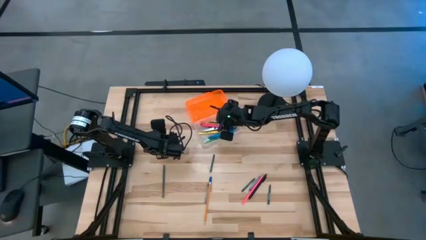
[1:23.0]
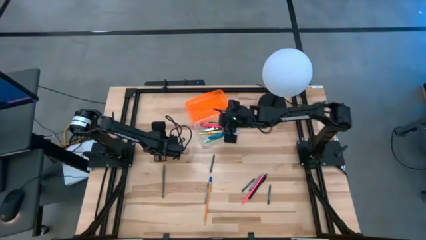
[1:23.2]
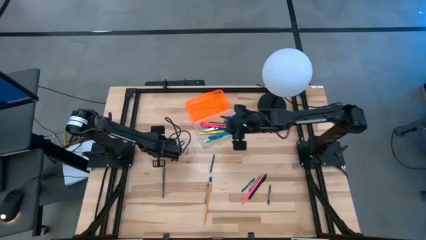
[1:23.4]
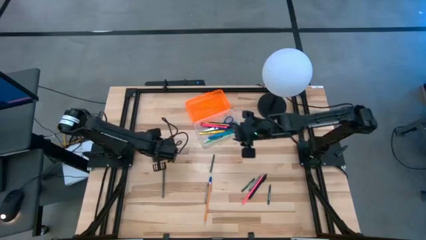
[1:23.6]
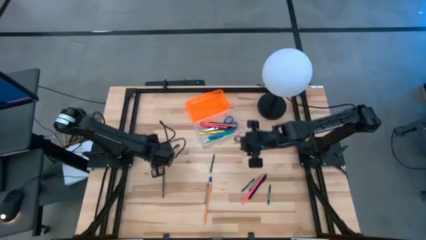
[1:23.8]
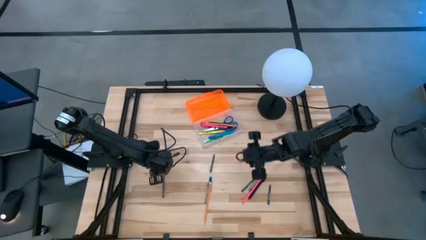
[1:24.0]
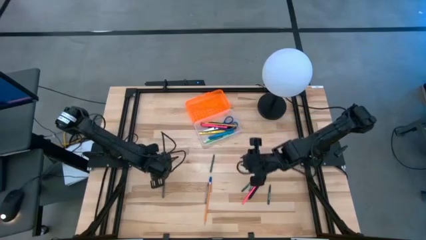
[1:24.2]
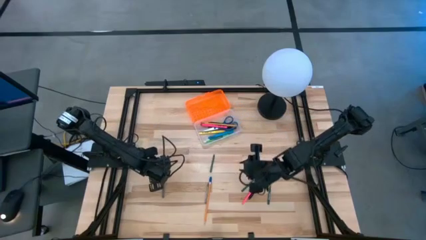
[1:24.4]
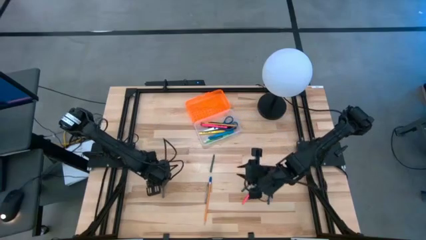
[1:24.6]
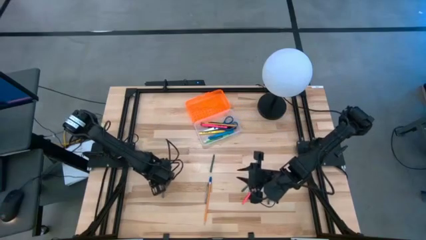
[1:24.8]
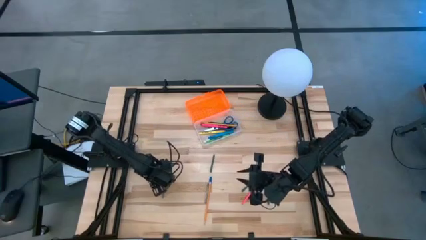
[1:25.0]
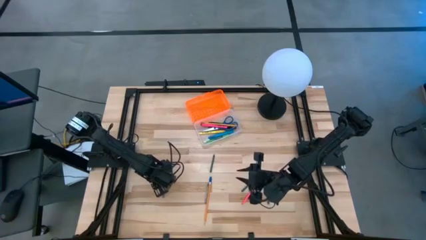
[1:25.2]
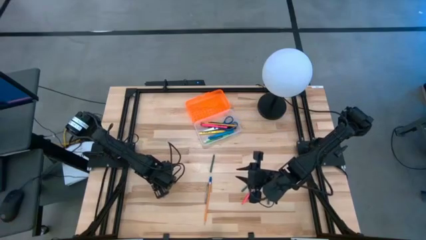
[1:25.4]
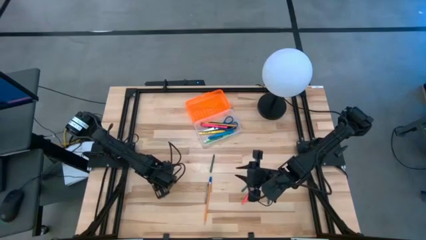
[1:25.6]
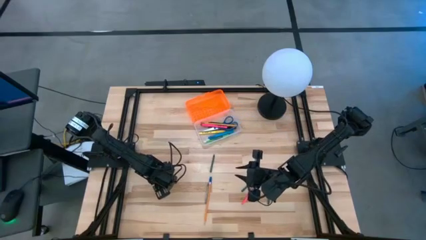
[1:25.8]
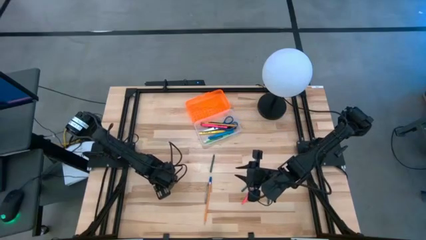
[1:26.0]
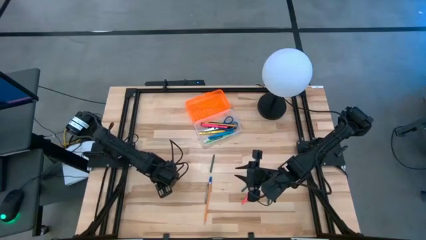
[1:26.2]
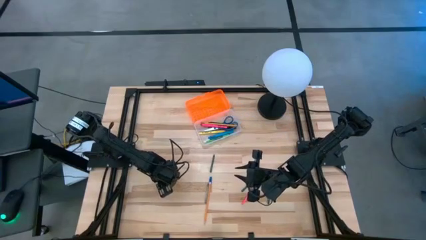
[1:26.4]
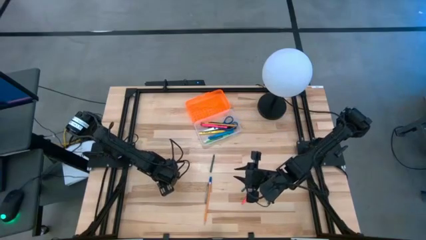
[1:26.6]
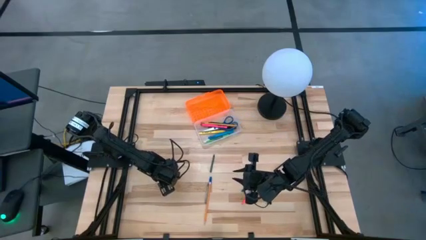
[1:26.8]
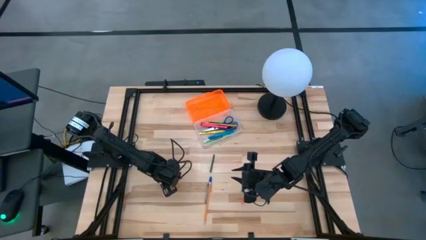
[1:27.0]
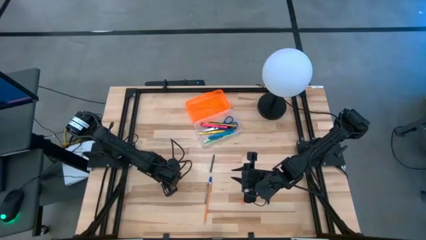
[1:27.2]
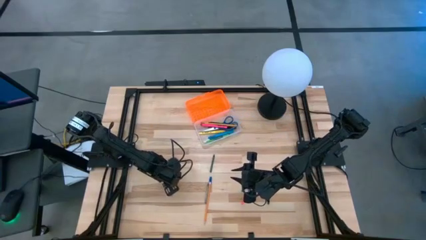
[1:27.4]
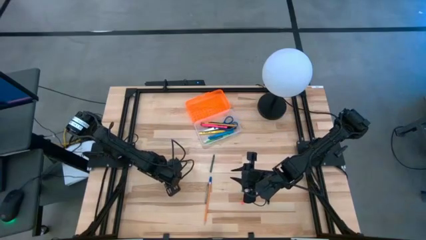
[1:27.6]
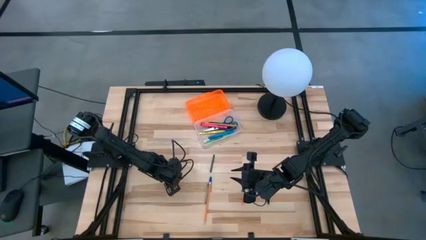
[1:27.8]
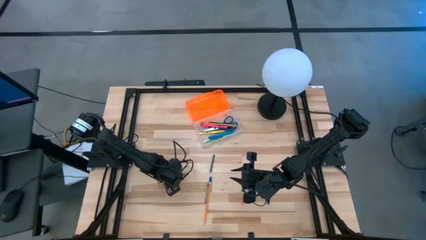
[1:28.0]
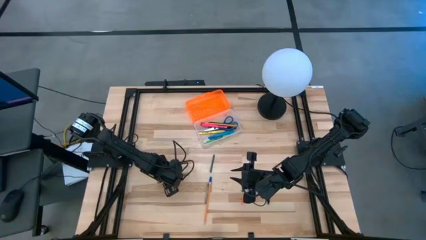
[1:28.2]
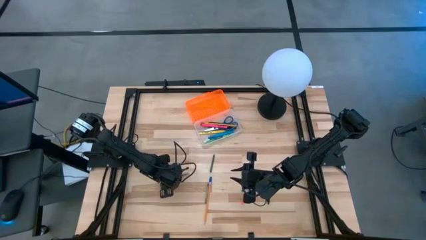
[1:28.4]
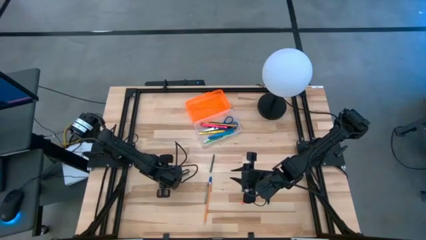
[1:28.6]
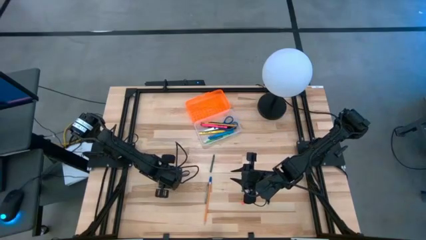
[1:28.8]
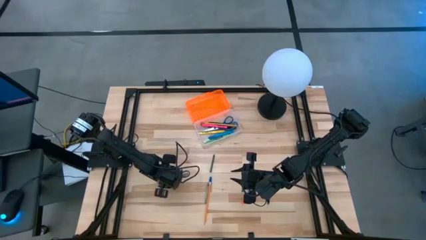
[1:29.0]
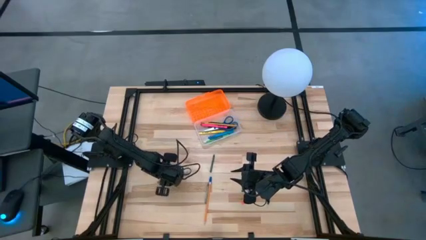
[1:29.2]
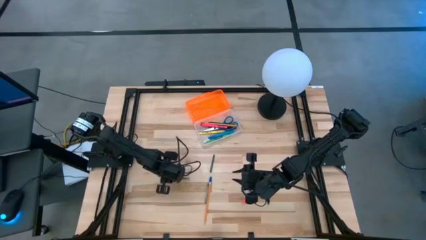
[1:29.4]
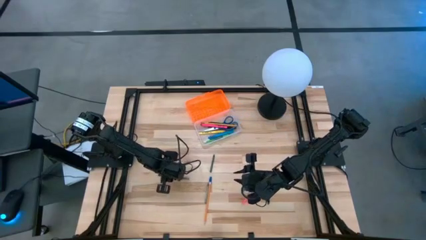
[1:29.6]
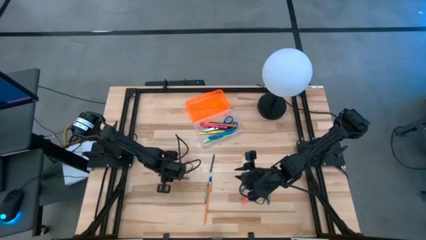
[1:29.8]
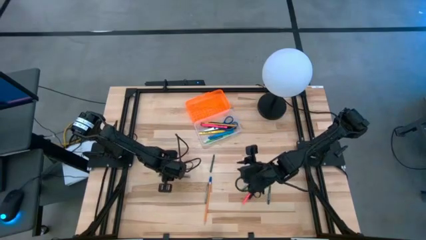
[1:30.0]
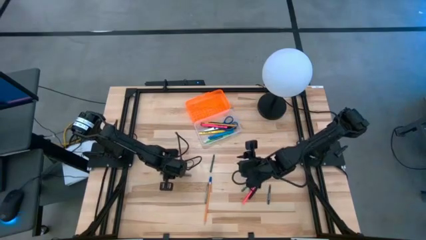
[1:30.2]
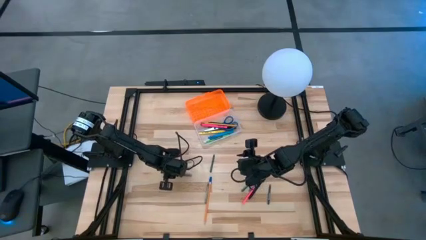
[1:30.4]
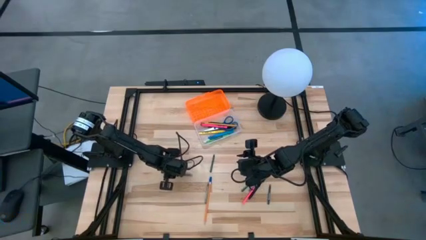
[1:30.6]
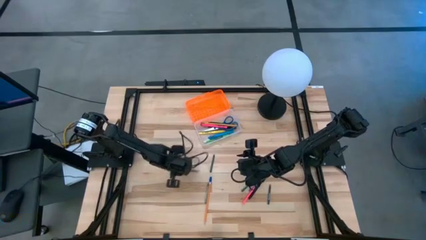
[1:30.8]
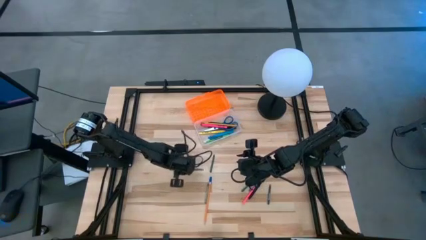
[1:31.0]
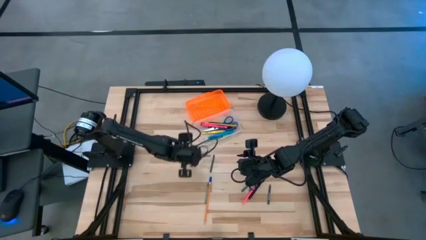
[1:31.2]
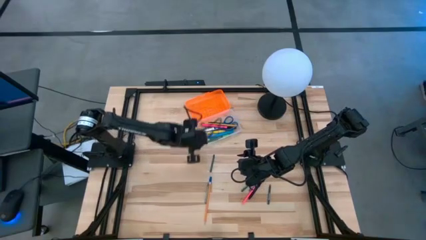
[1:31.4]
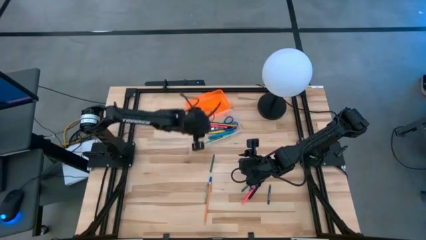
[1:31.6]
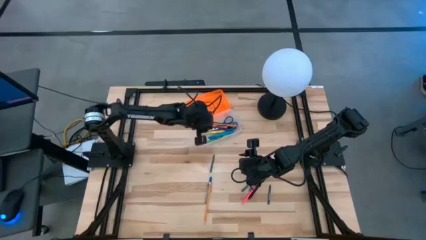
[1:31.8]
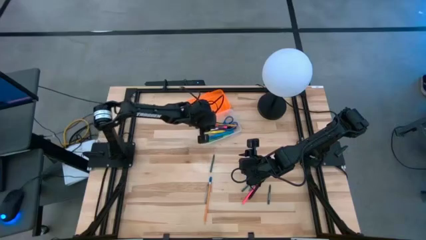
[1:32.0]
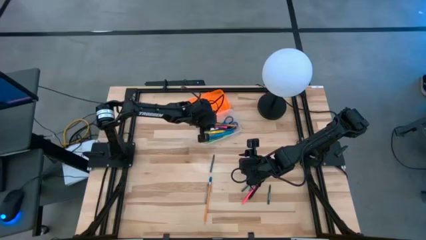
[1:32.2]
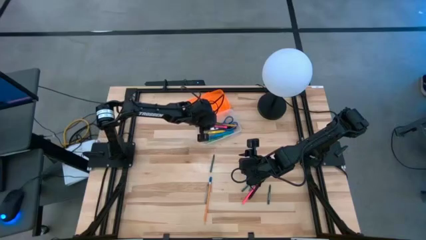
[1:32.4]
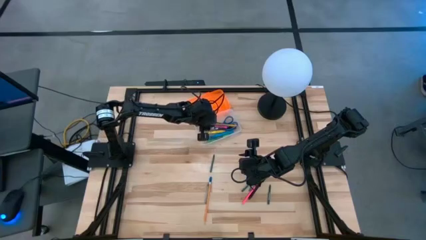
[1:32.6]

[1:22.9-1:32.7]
Task: Pick & place school supplies into a supply box
Put the gray pen into the supply box

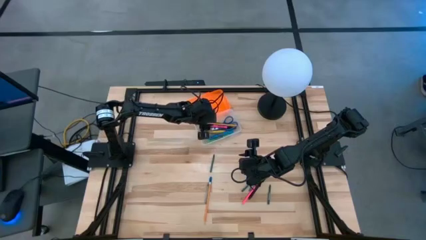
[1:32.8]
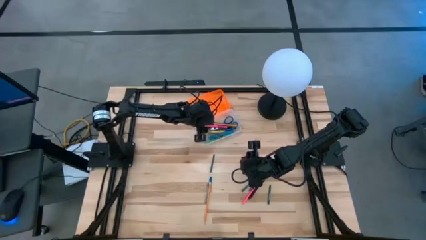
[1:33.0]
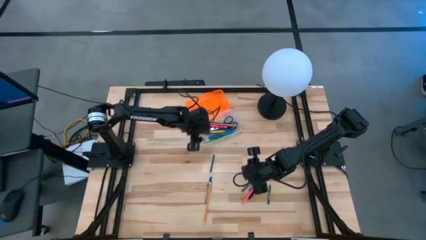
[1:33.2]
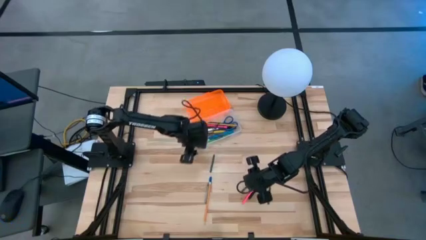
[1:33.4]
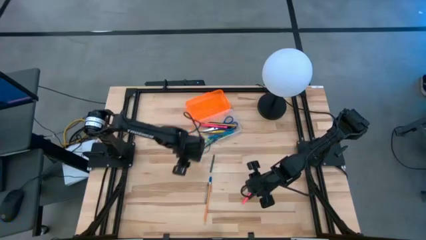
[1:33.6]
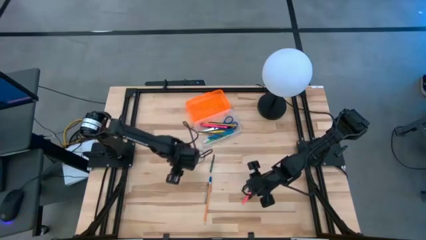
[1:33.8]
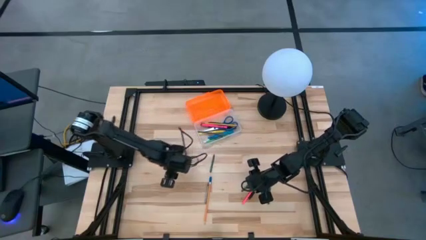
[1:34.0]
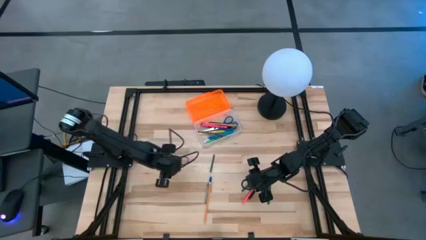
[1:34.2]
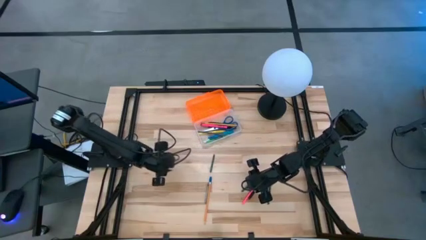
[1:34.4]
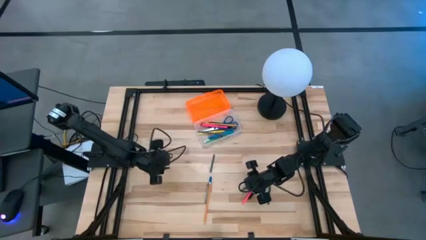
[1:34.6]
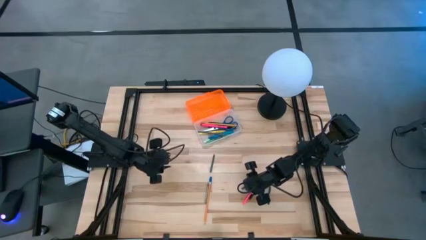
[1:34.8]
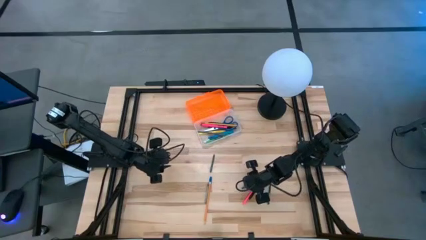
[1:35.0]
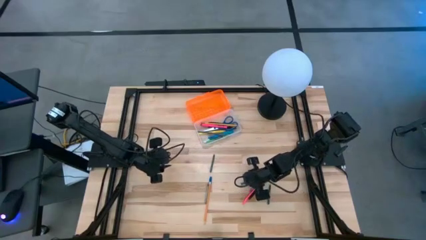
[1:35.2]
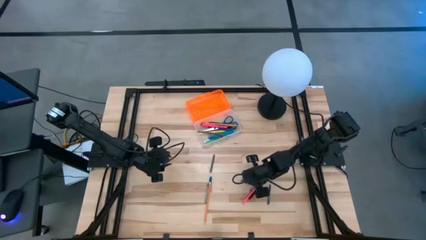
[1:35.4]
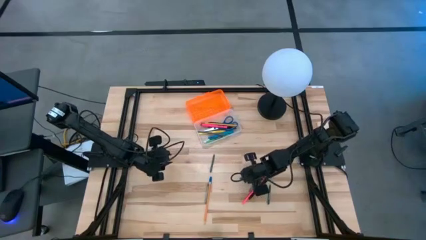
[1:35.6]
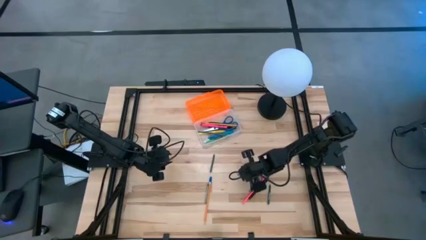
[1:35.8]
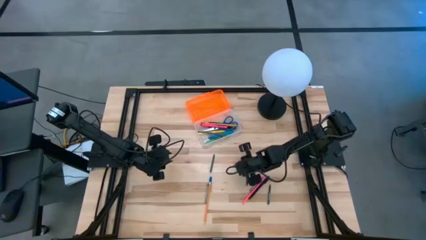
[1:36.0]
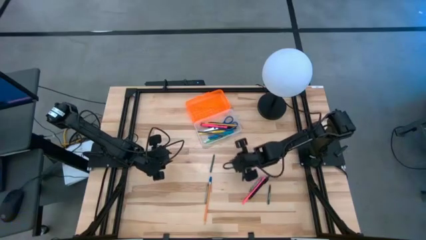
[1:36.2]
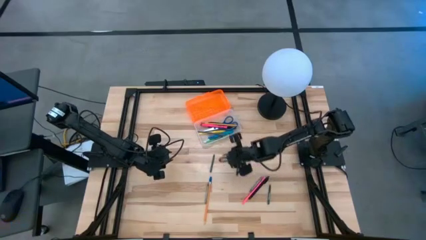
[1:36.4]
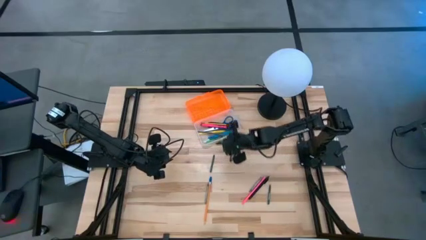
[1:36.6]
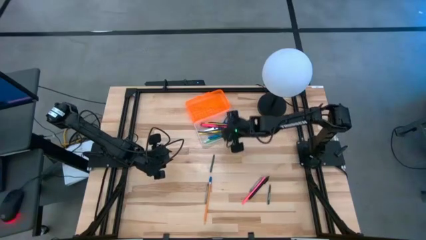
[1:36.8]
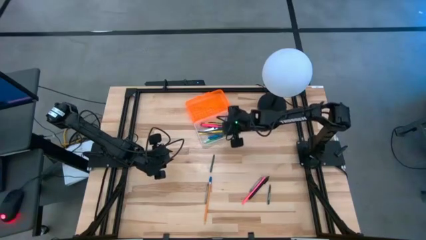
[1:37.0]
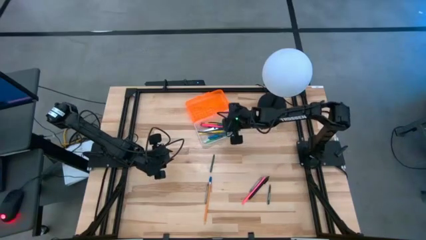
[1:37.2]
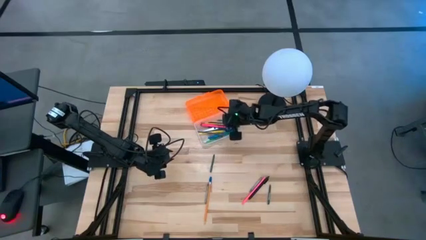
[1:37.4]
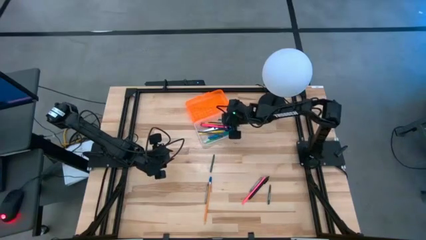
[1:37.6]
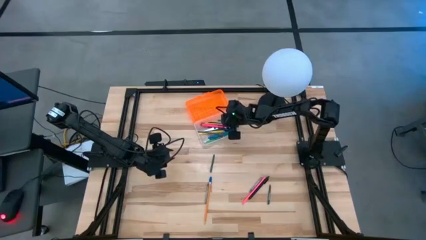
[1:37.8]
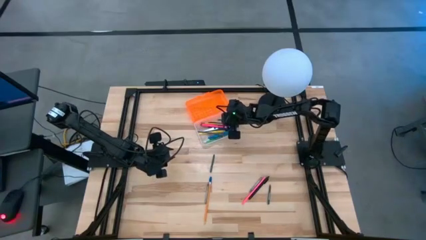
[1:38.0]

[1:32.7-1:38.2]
Put the middle green crayon into the supply box
